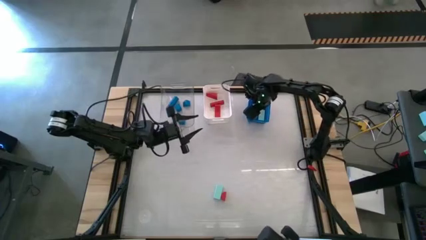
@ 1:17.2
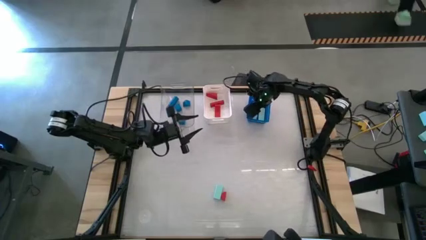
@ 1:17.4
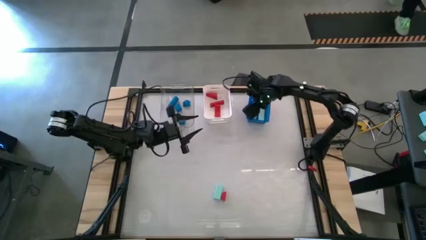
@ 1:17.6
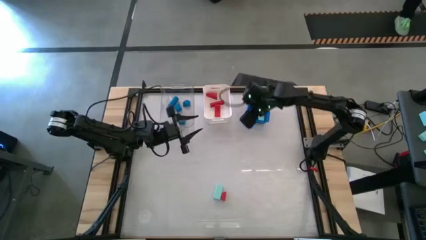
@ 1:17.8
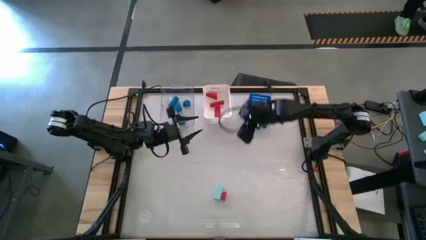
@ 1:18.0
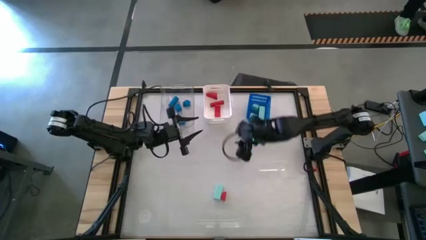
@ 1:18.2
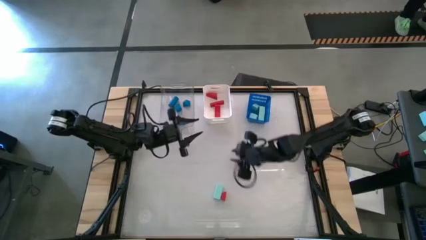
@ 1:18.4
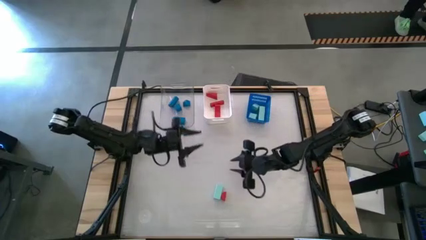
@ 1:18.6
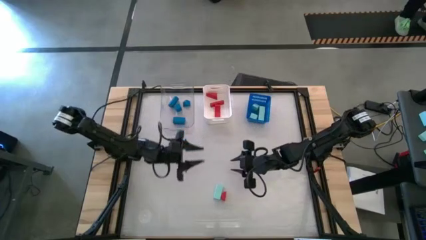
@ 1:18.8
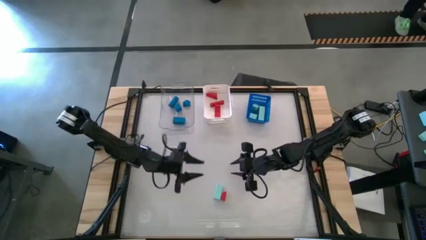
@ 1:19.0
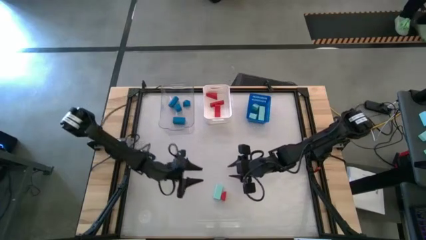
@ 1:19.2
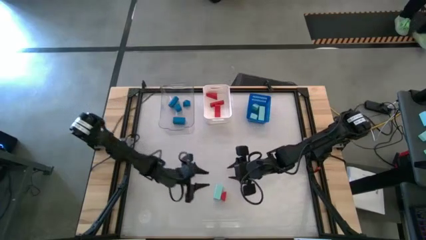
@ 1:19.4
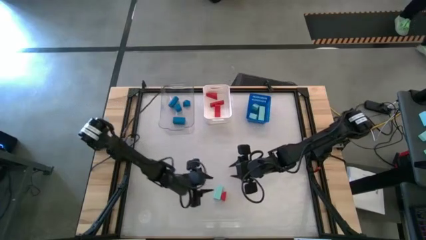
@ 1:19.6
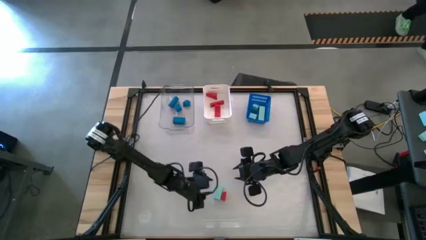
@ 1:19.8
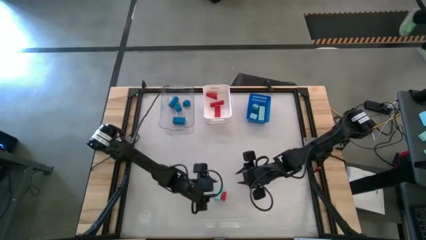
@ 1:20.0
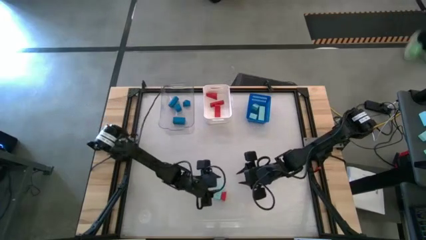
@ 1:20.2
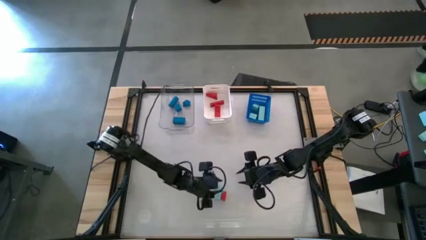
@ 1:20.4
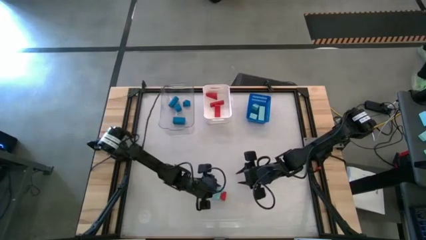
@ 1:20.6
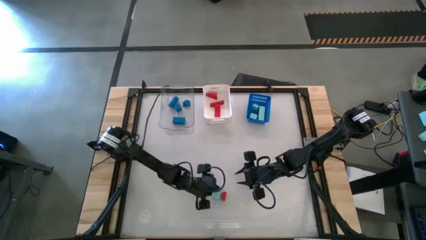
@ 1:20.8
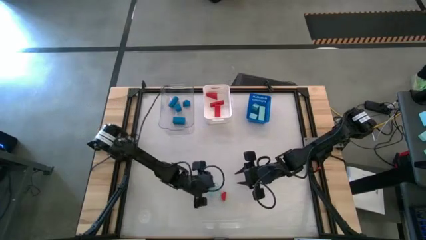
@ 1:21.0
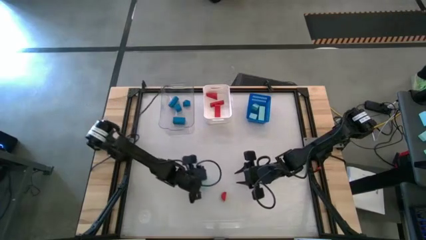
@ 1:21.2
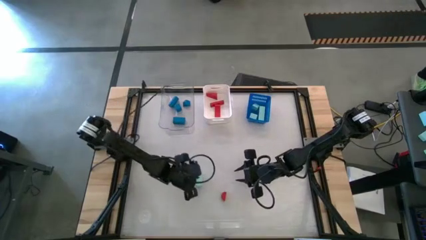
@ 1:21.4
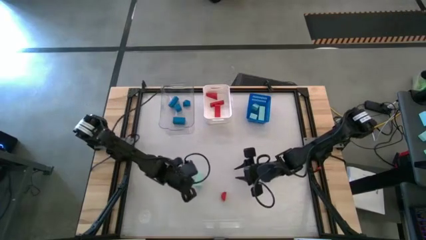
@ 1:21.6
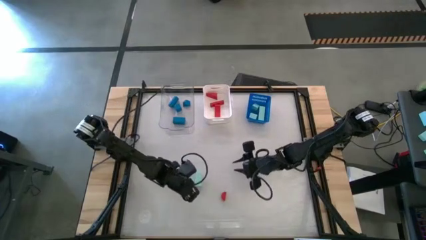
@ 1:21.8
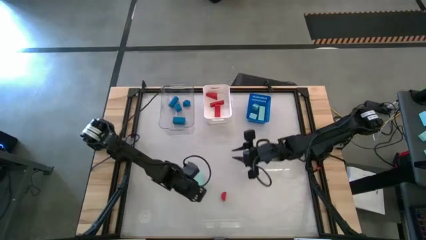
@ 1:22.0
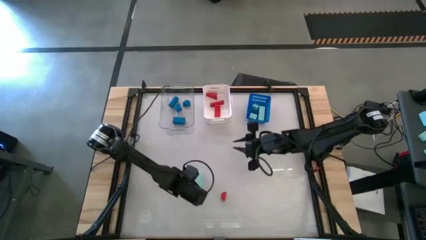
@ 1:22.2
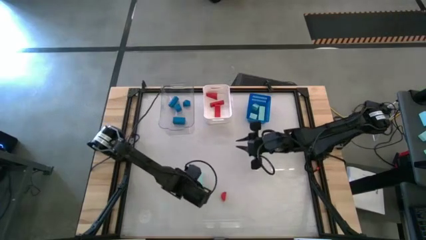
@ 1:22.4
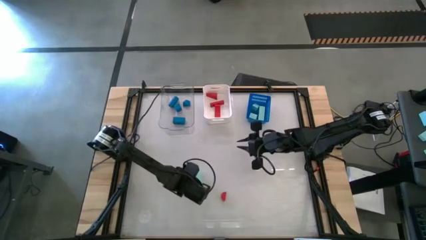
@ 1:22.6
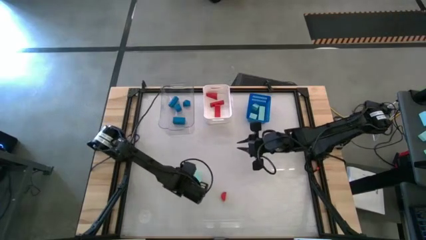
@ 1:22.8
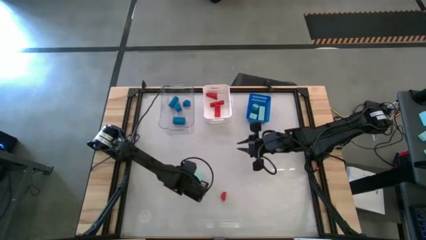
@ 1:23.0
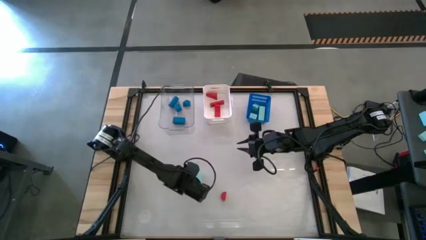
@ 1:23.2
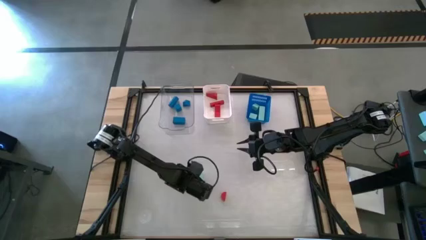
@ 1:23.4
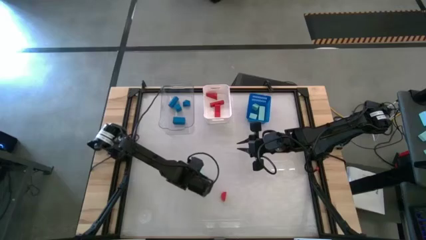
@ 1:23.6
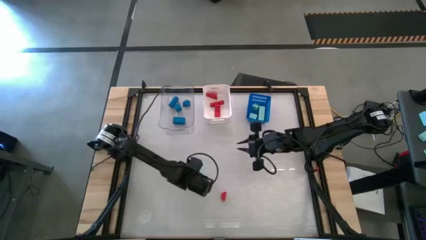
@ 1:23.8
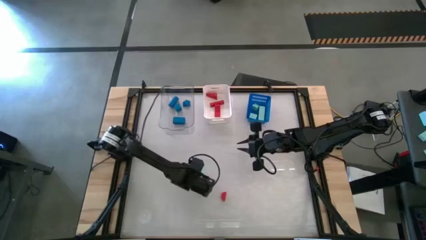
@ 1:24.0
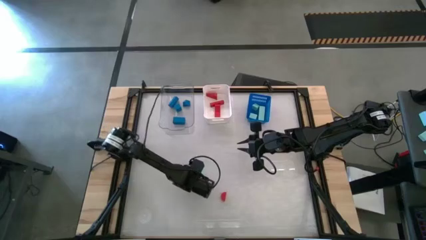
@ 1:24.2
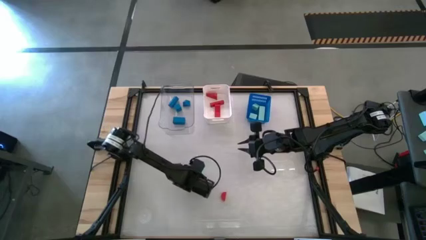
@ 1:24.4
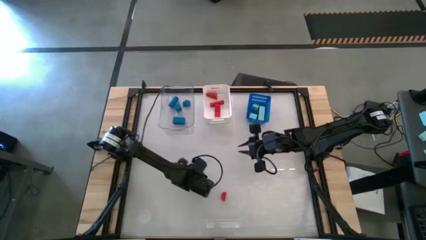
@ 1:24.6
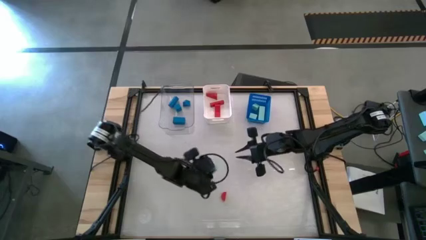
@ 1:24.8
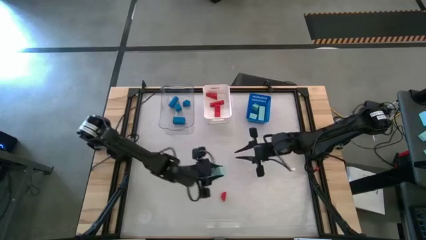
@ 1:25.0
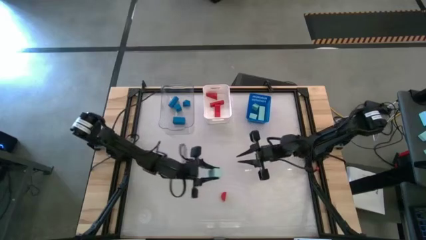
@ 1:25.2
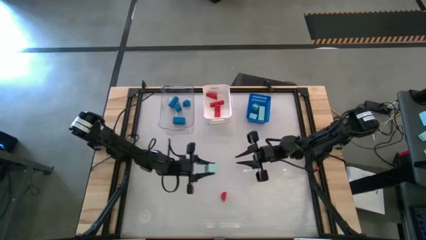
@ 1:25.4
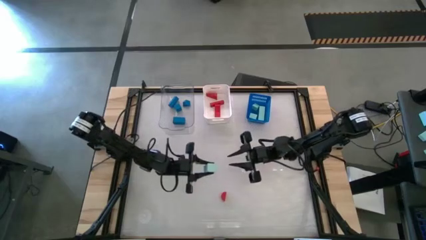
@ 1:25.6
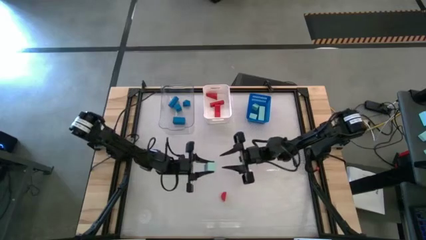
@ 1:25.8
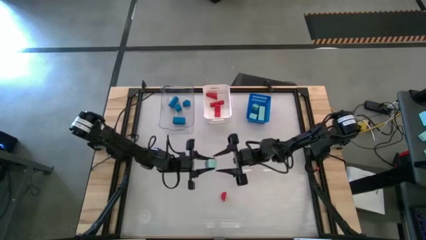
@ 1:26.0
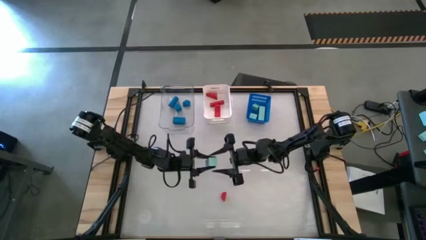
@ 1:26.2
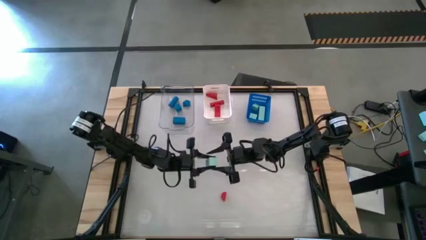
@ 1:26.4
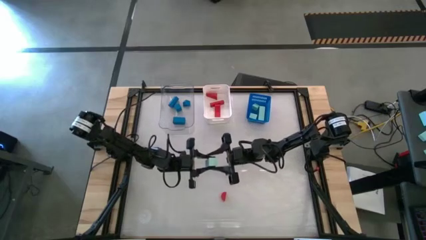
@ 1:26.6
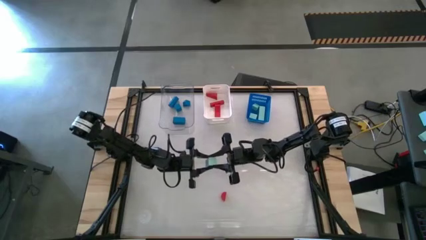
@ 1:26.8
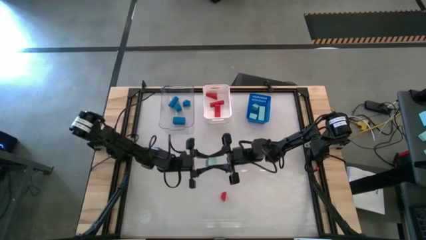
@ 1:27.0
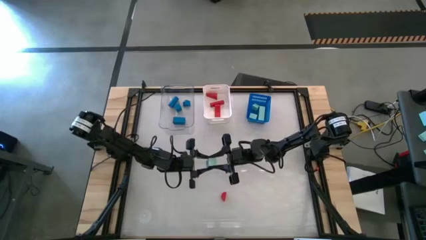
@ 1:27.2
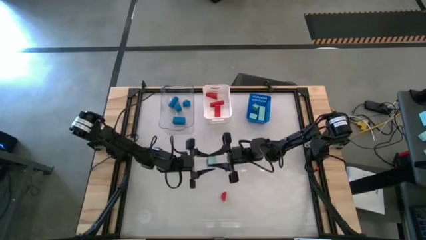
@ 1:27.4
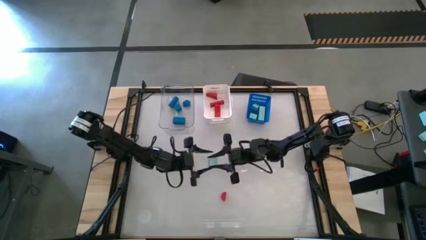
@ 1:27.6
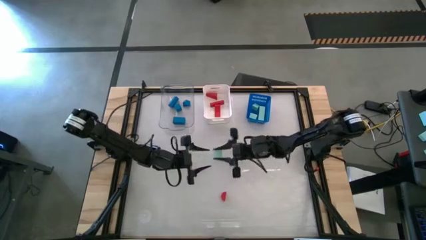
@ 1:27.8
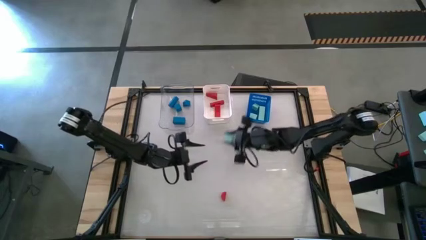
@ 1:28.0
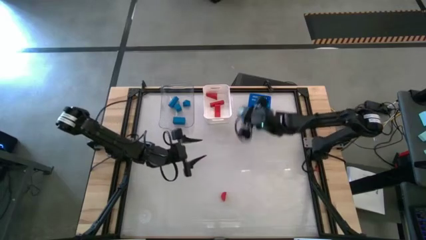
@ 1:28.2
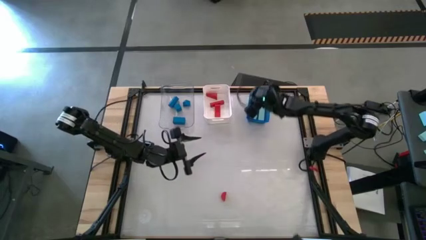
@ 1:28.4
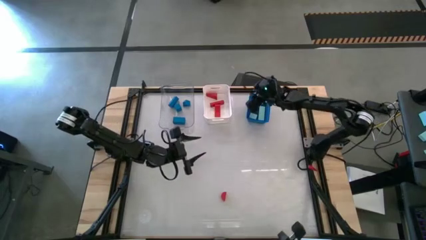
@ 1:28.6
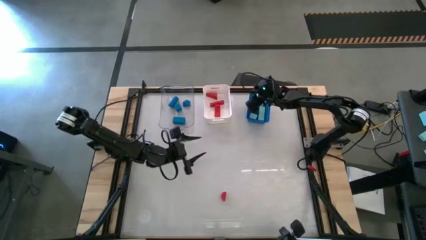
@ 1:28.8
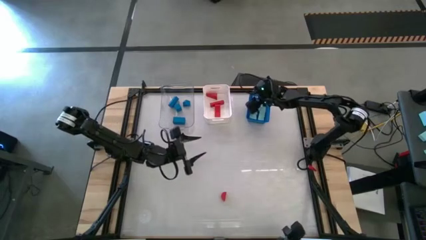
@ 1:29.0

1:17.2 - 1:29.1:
Task: Sort & place blocks by color
Put the light blue block into the blue bin

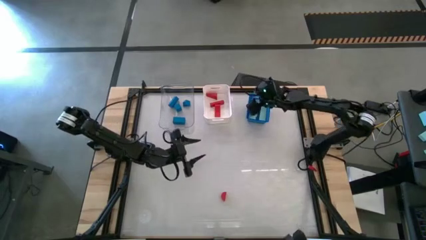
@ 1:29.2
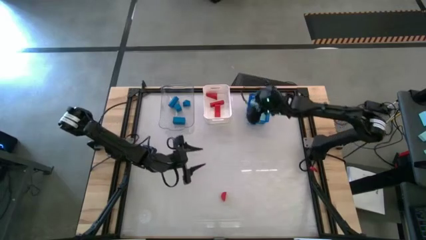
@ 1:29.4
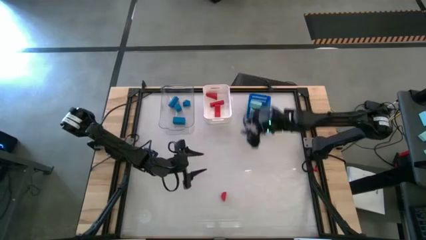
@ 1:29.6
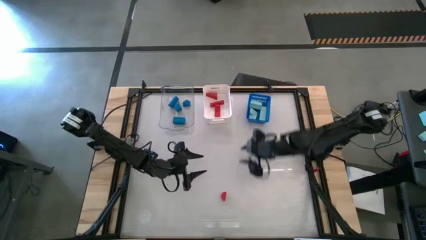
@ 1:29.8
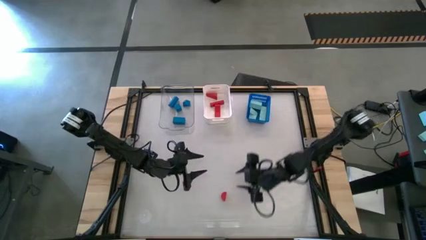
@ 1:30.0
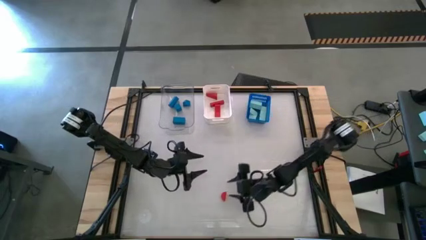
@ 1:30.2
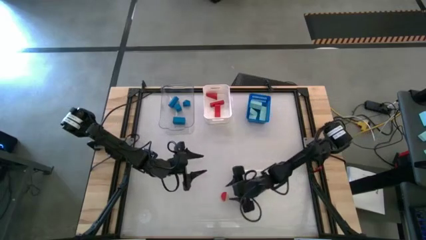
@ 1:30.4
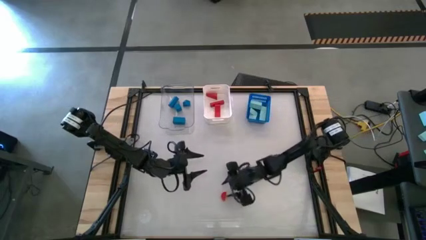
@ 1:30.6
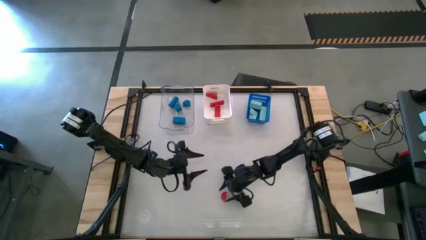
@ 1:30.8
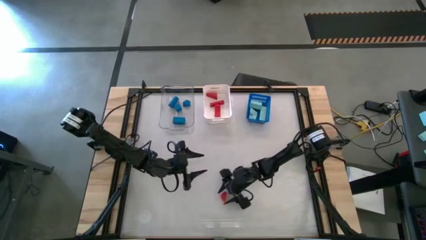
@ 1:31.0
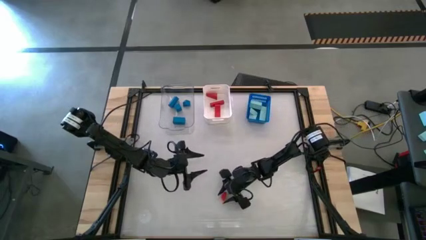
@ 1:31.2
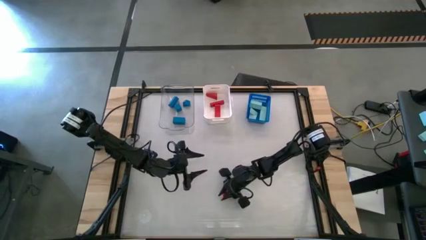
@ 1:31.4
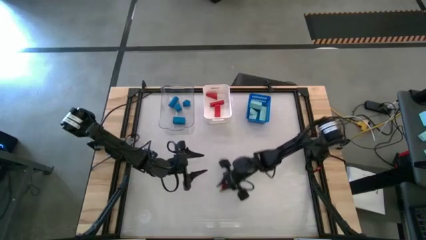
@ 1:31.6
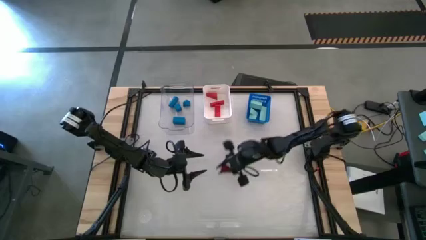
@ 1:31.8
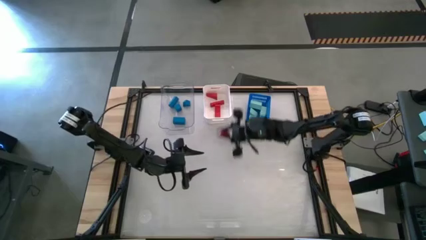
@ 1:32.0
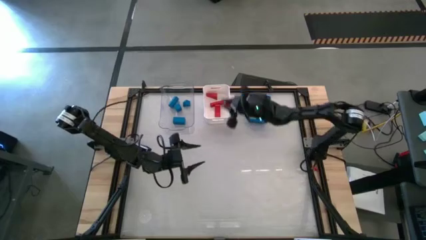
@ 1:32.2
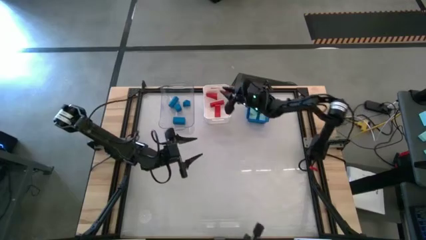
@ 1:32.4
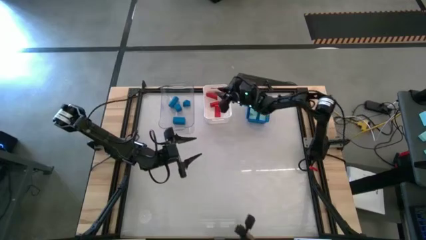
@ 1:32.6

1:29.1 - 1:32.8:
Put the red block into the white bin
